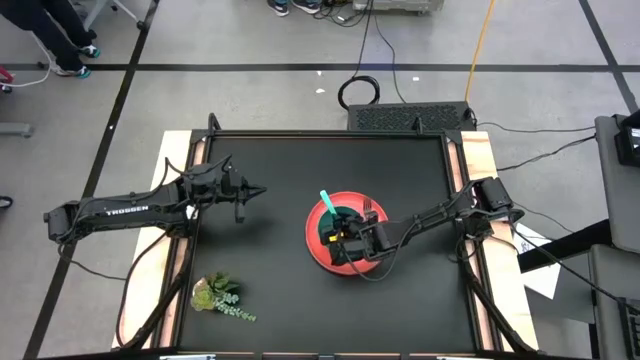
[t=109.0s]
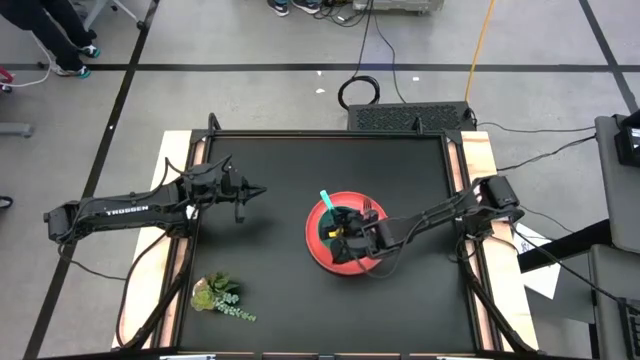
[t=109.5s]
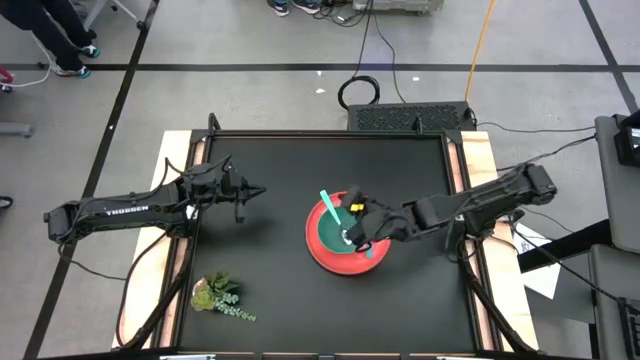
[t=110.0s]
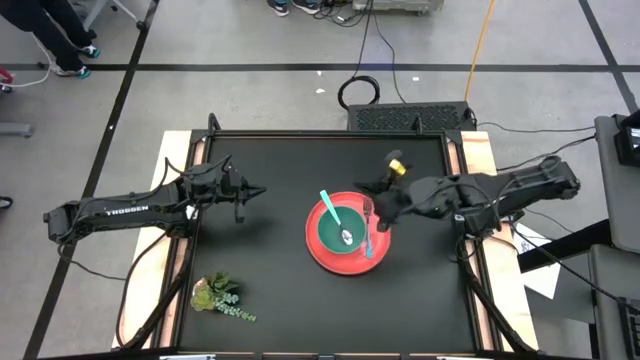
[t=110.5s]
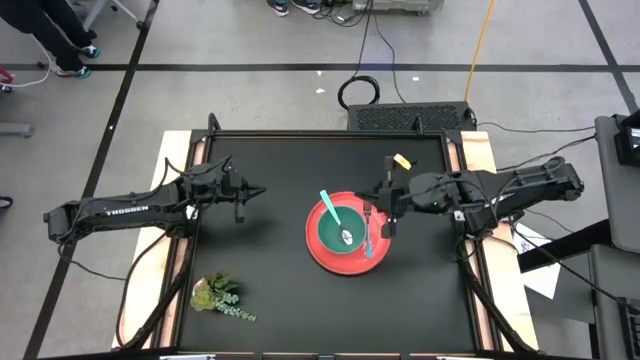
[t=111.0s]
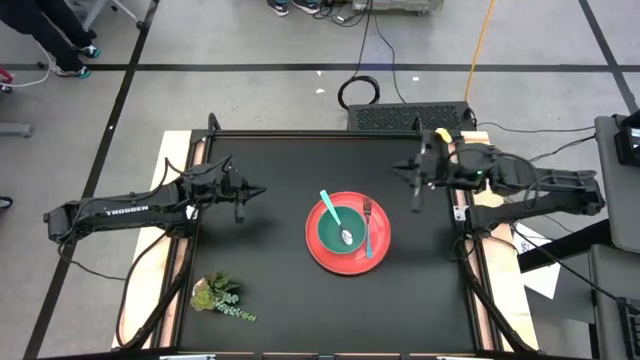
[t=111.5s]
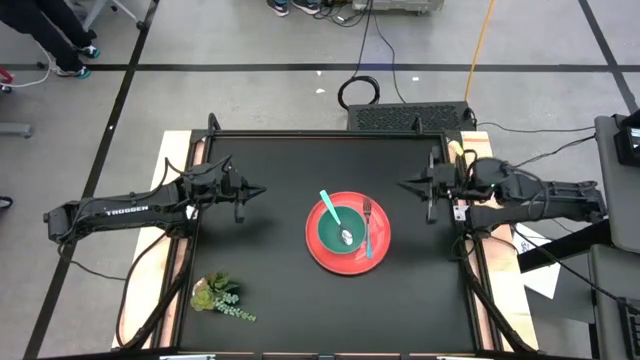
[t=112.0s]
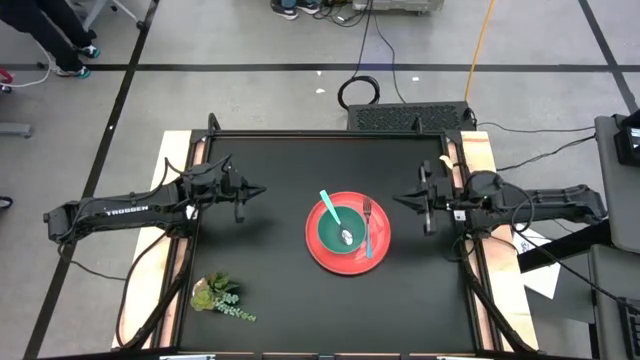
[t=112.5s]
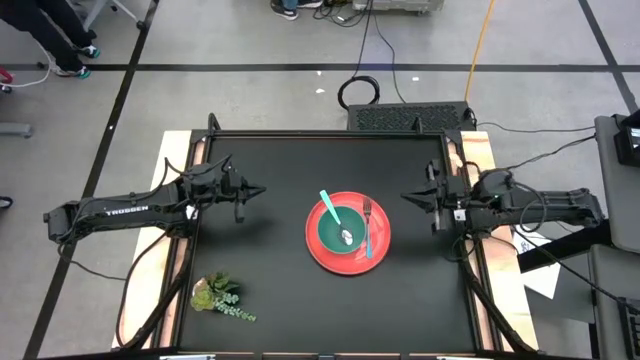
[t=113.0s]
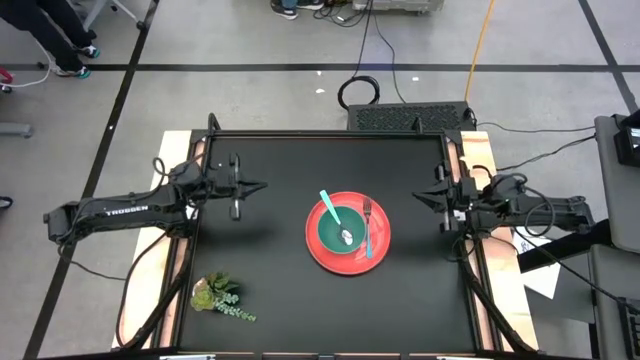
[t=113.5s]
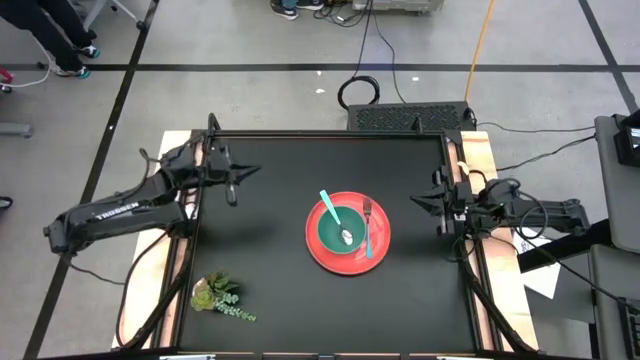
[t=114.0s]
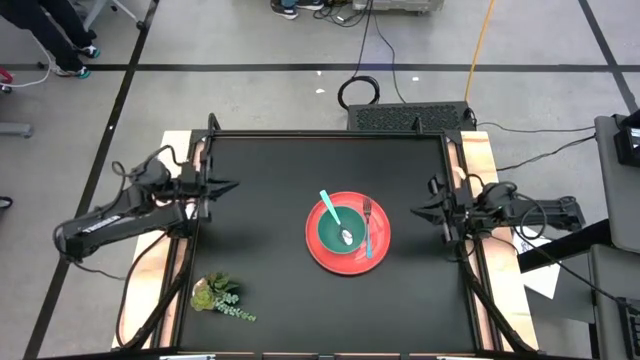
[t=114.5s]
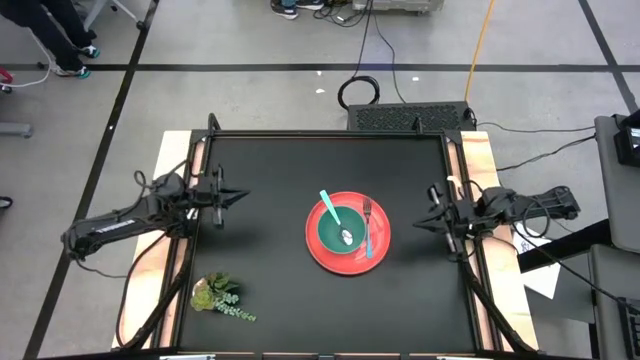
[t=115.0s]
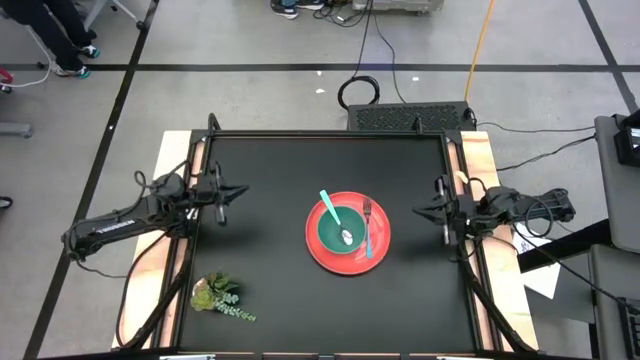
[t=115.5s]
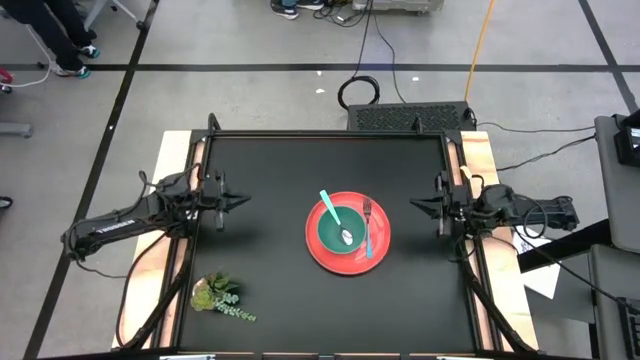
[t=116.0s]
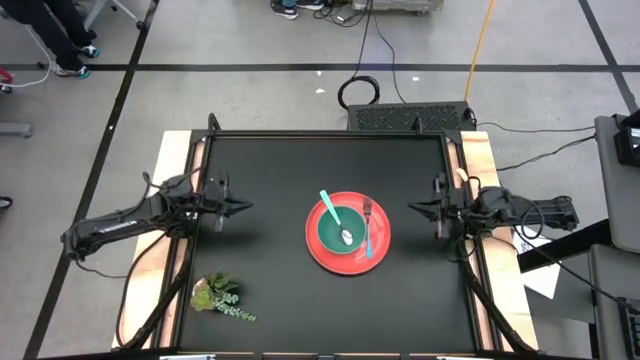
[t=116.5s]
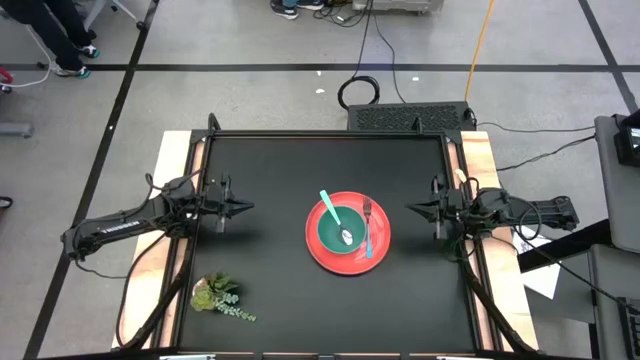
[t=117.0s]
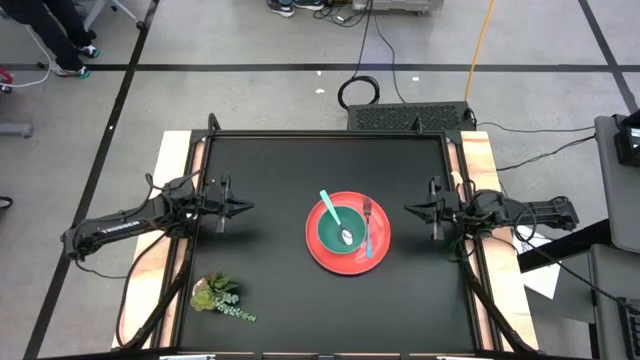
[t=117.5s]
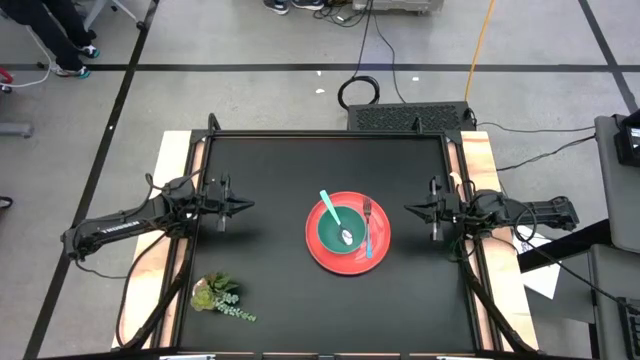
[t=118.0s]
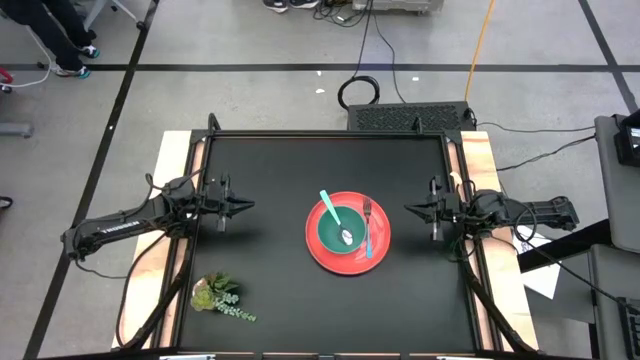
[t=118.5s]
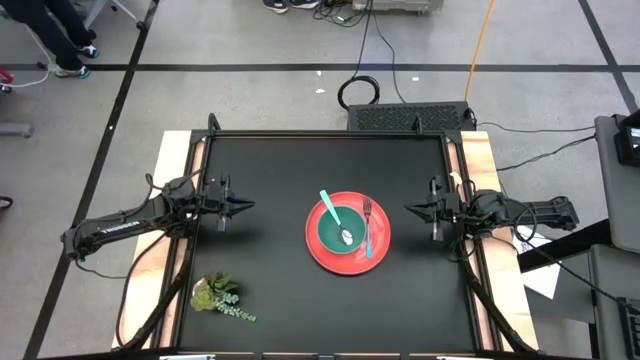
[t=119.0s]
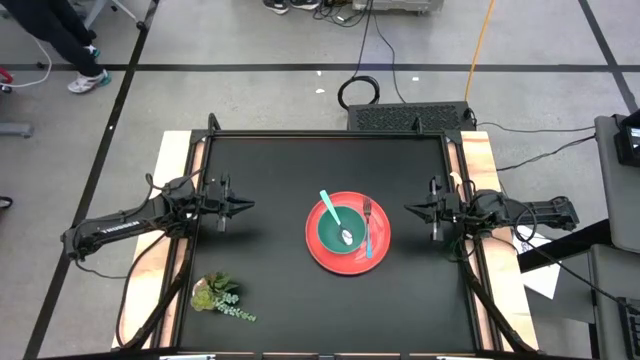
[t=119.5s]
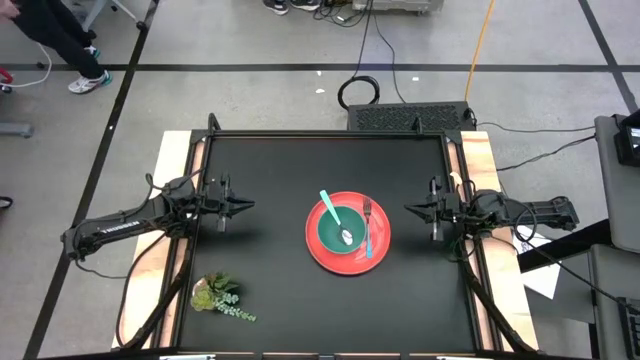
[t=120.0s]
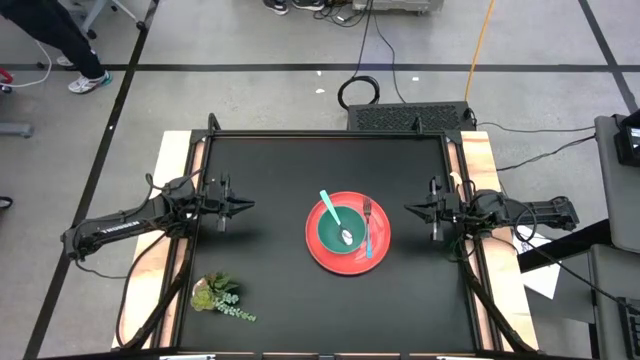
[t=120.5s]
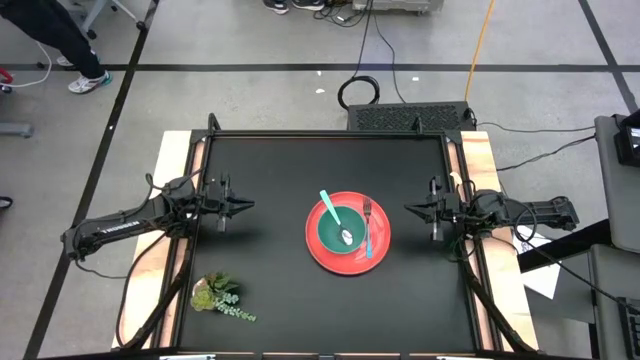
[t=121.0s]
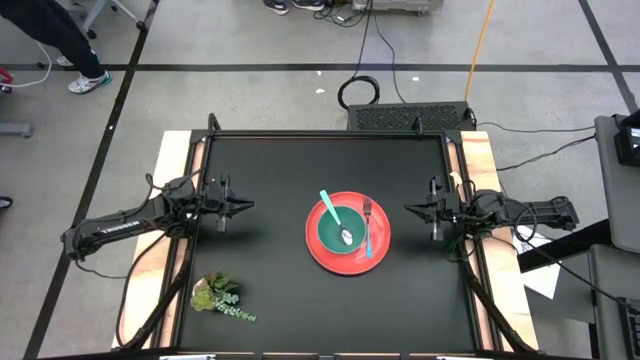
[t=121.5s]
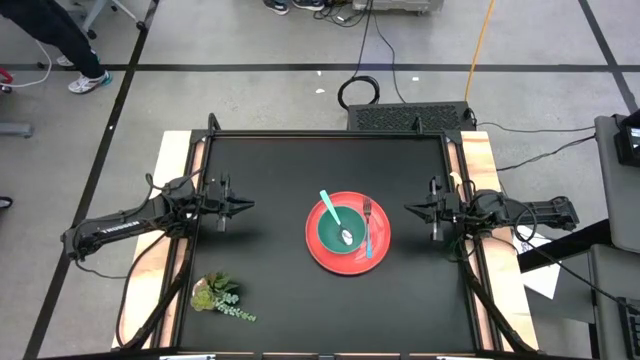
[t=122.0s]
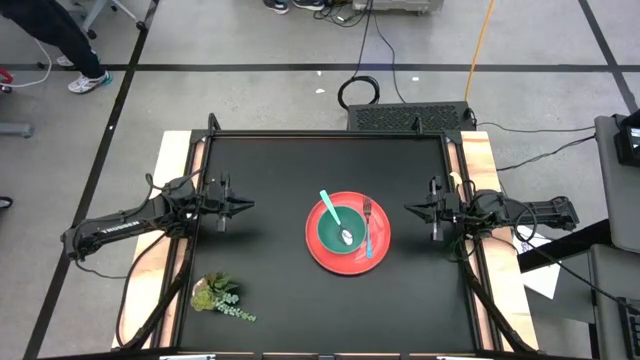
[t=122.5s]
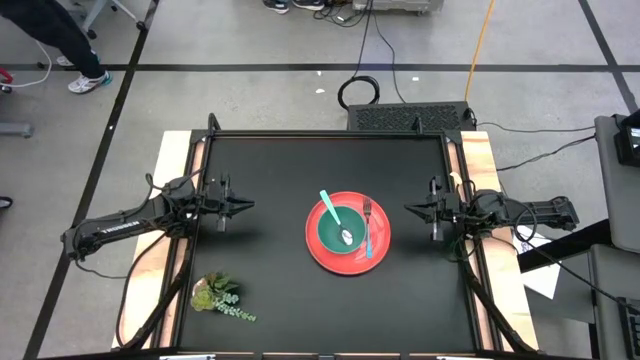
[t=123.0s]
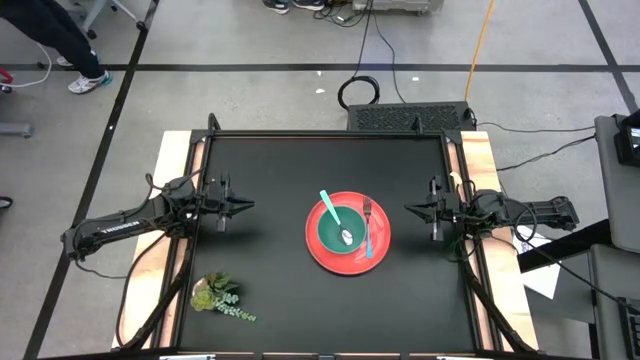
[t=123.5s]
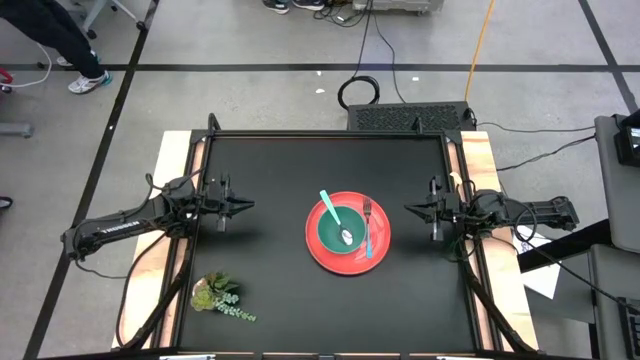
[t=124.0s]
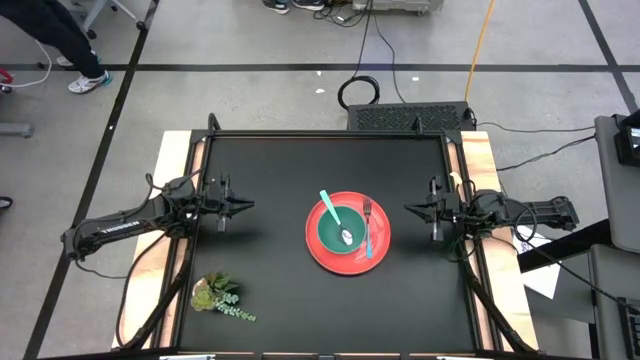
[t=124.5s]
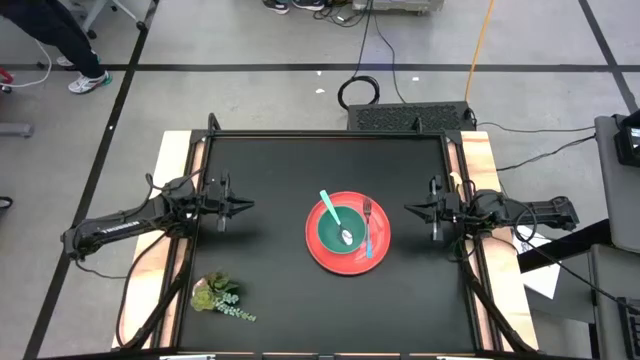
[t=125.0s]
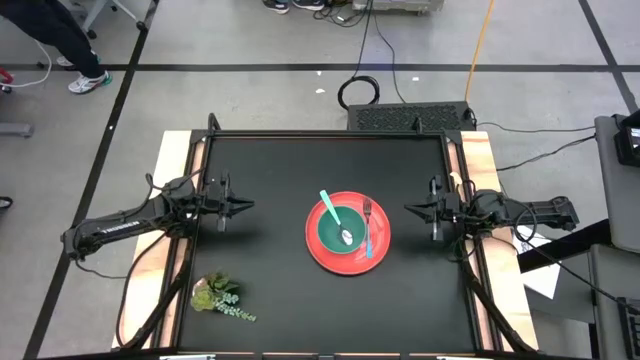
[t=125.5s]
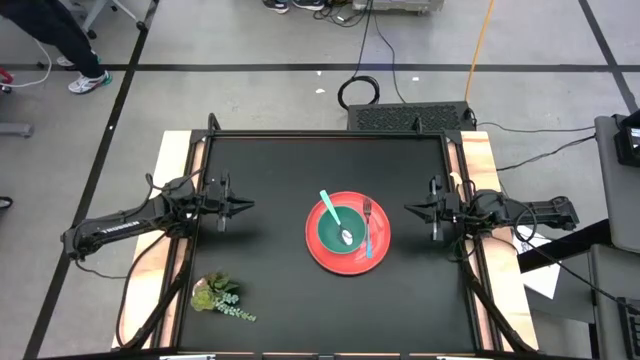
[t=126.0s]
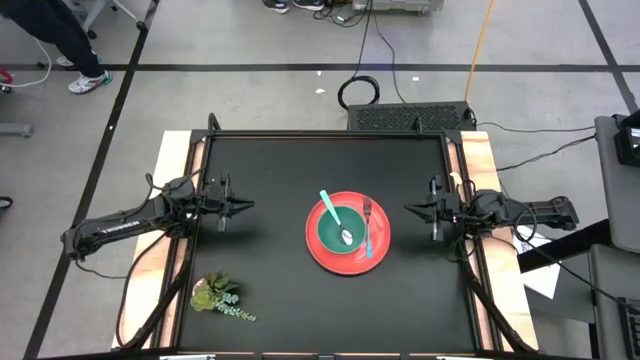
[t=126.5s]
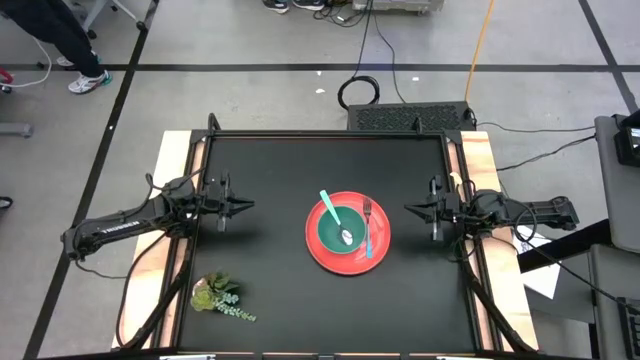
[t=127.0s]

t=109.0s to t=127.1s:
Task: Set table place
Return to Home Position

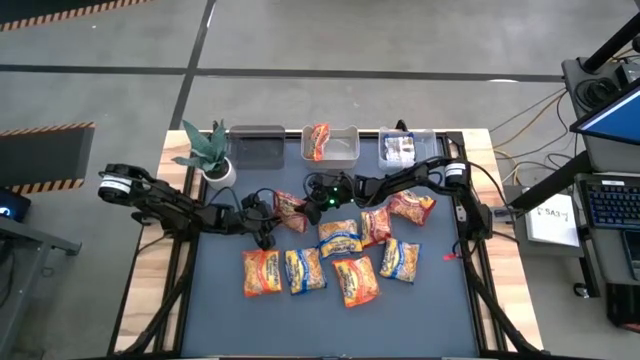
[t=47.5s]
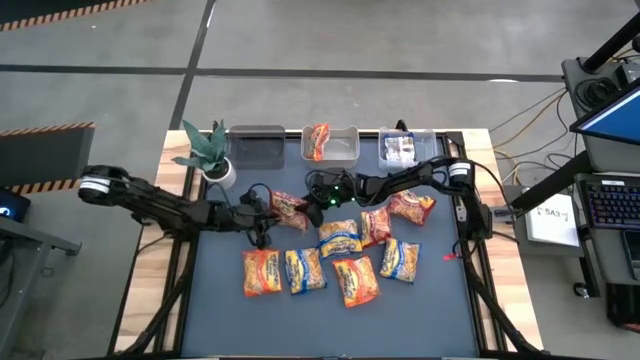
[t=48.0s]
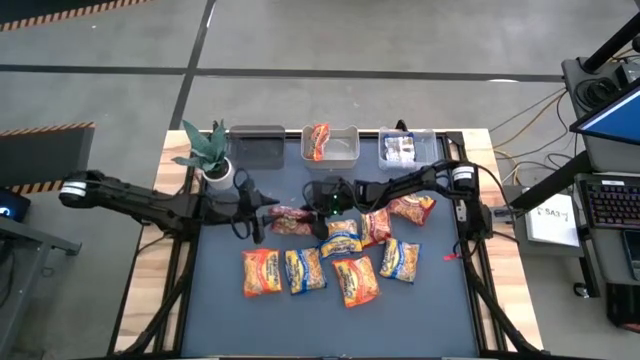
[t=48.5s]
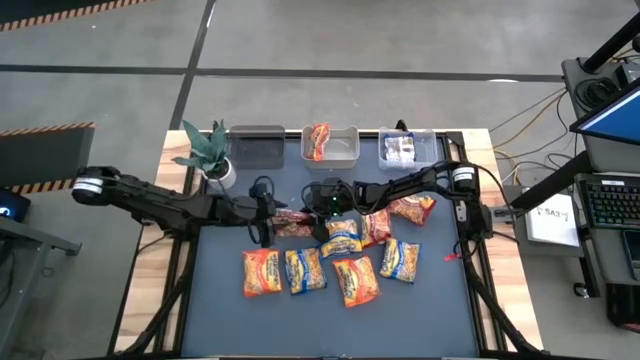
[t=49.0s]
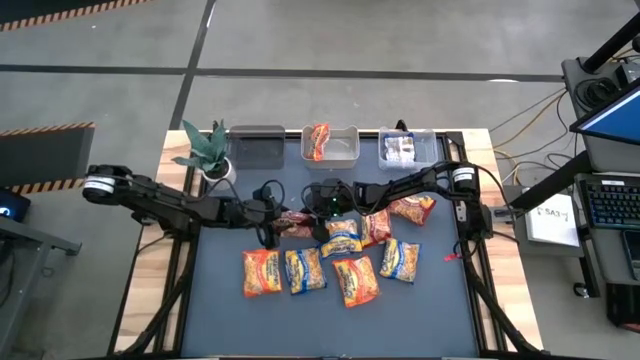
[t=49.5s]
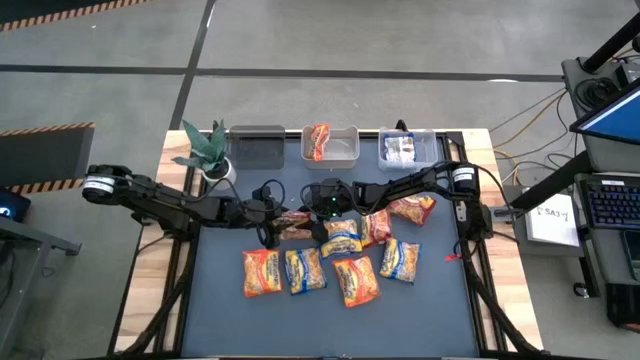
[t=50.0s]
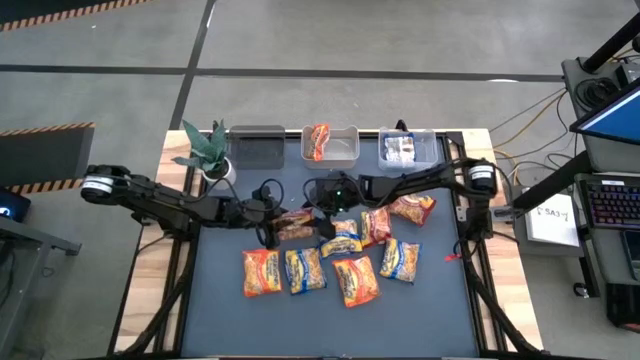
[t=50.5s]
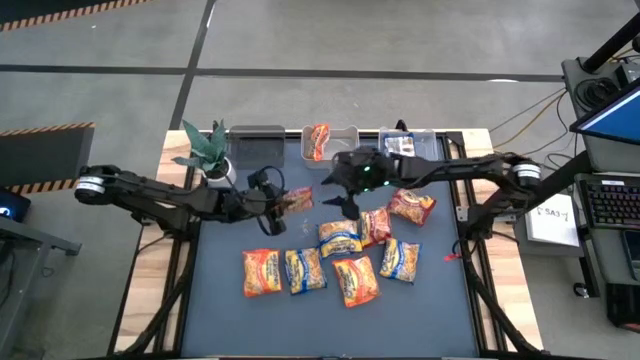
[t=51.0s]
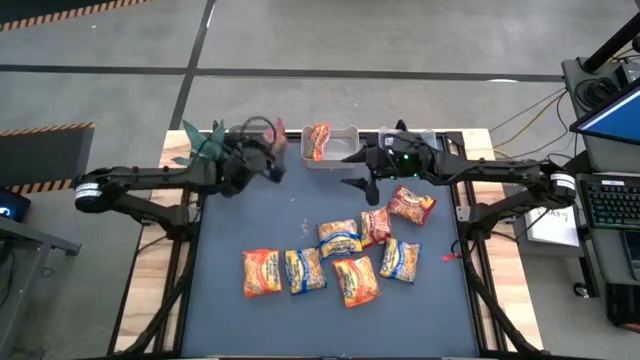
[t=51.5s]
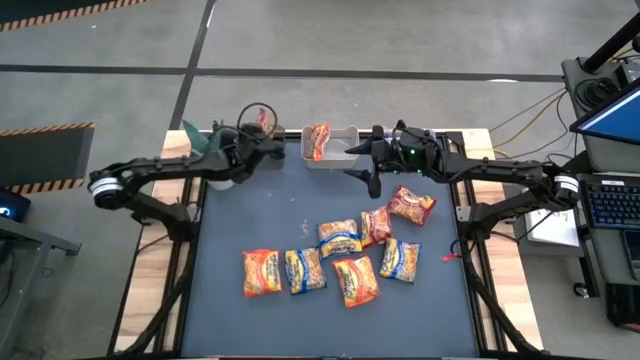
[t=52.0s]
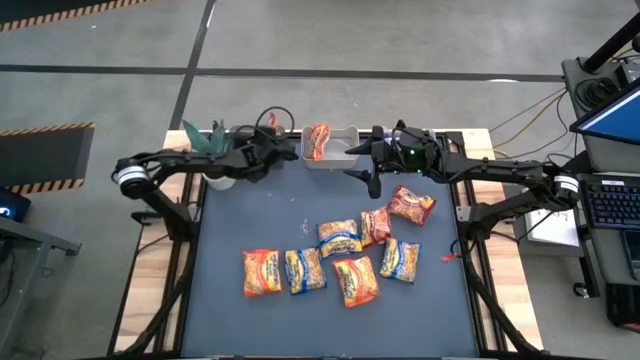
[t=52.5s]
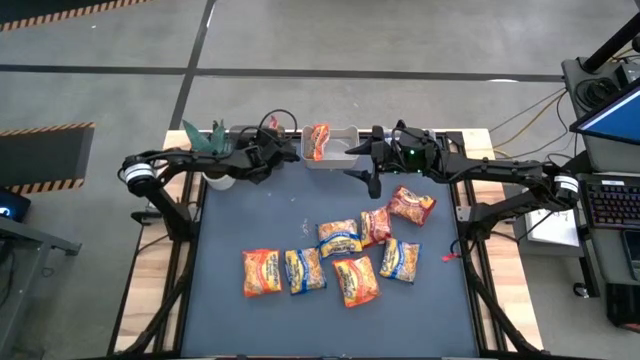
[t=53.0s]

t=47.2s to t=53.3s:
Task: Sort Maruchan noodles
Put the left red noodle pack into the transparent black bin
